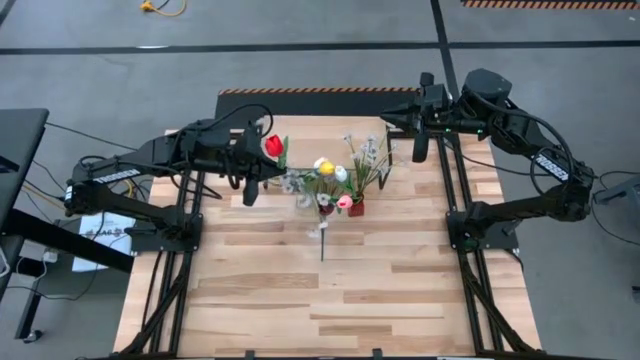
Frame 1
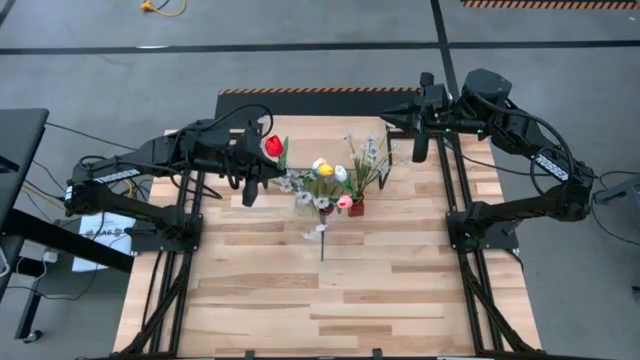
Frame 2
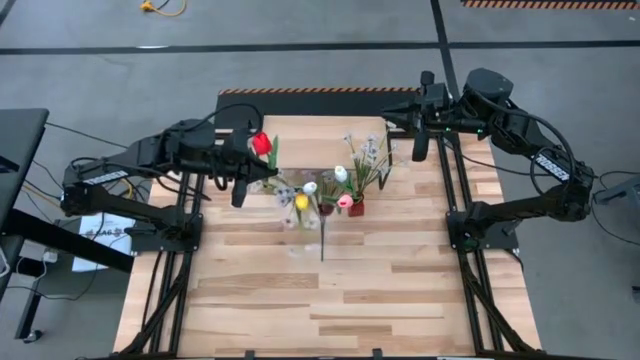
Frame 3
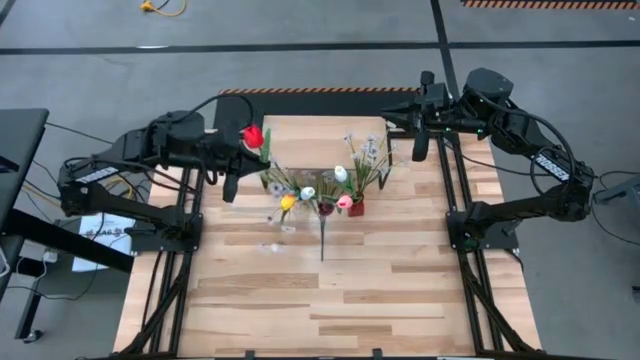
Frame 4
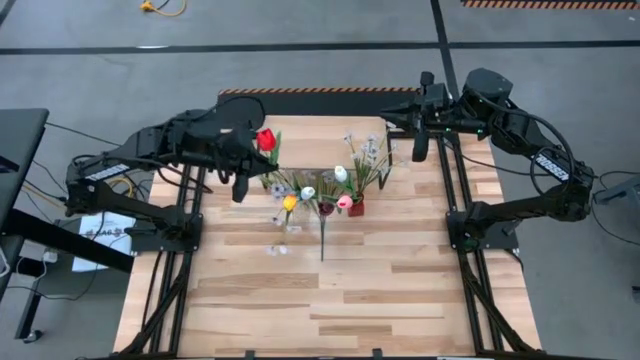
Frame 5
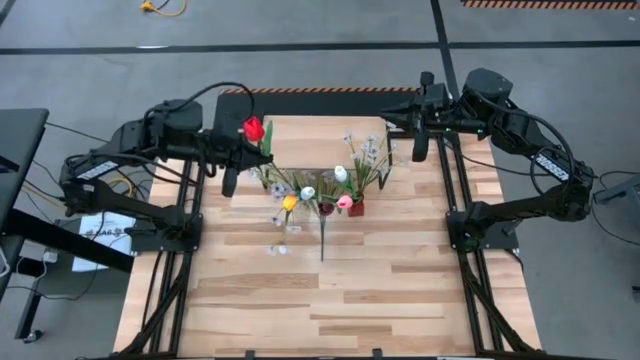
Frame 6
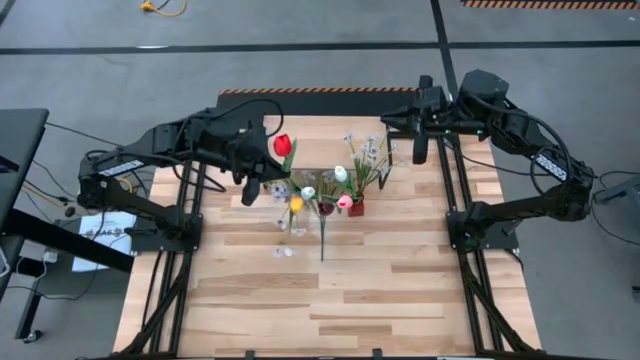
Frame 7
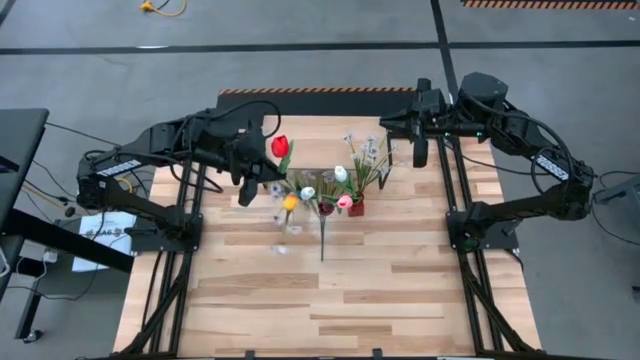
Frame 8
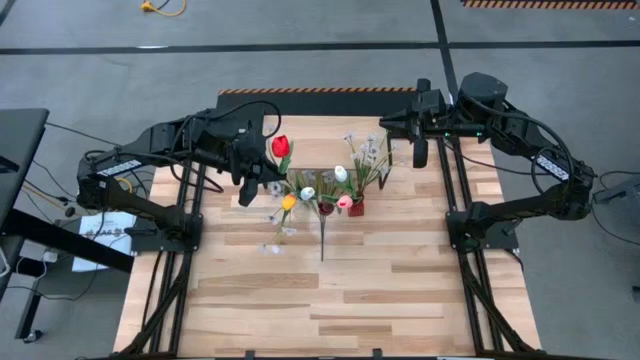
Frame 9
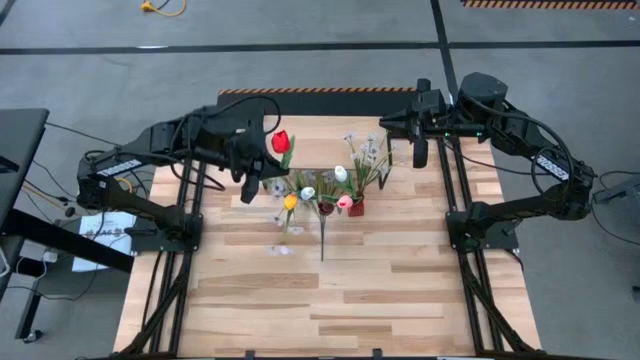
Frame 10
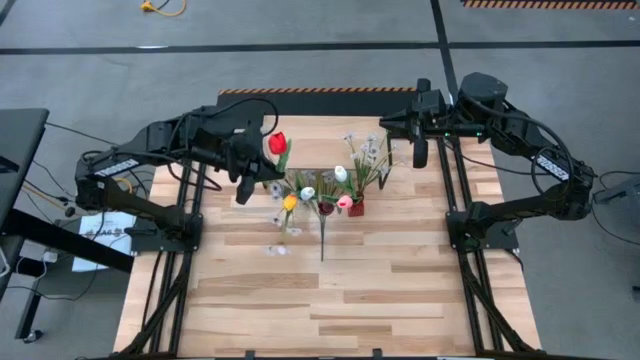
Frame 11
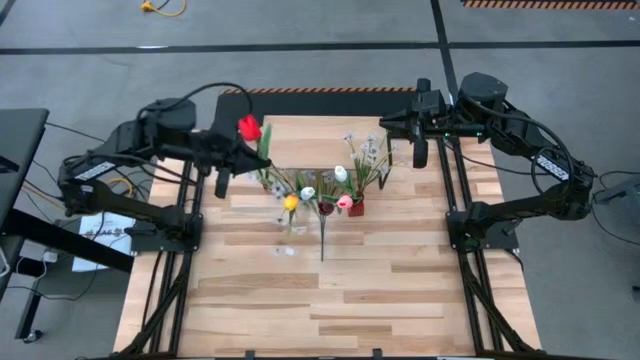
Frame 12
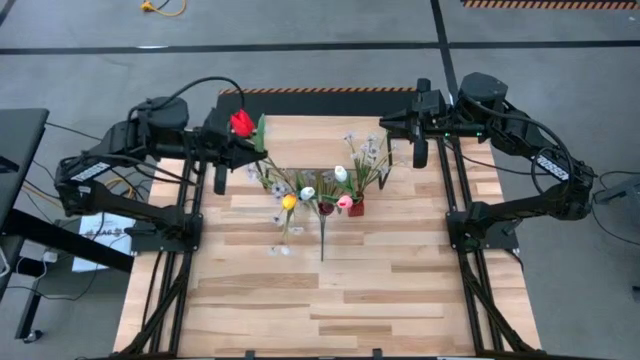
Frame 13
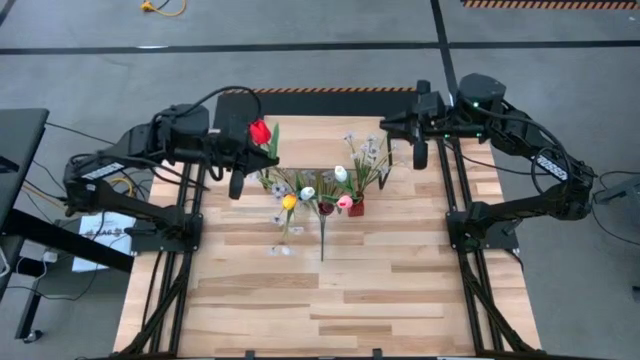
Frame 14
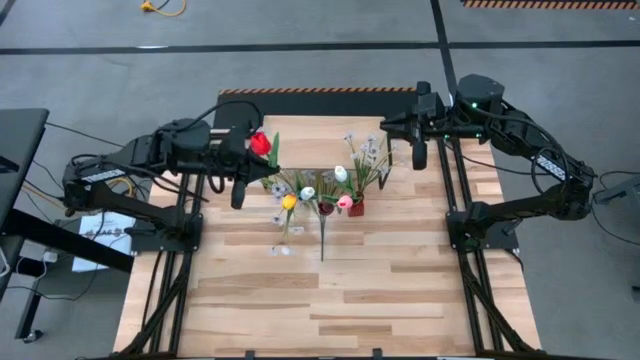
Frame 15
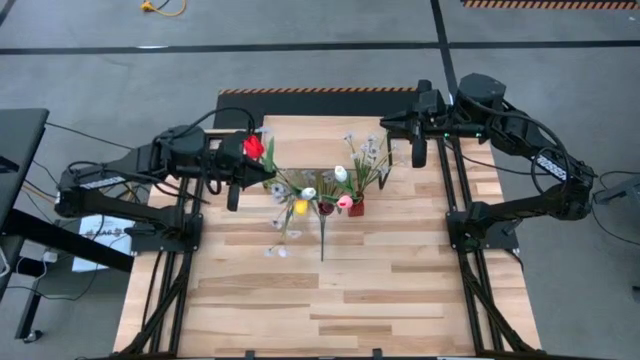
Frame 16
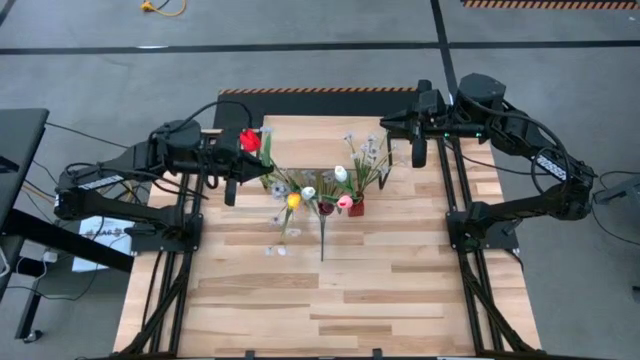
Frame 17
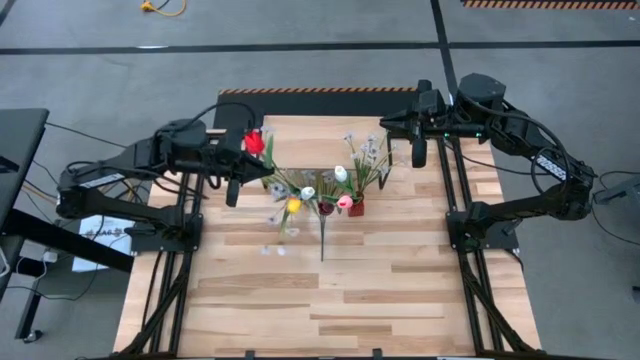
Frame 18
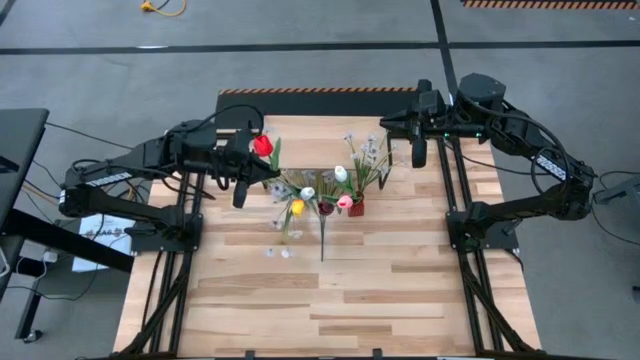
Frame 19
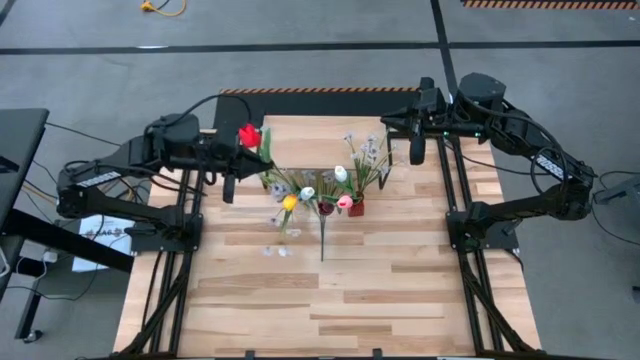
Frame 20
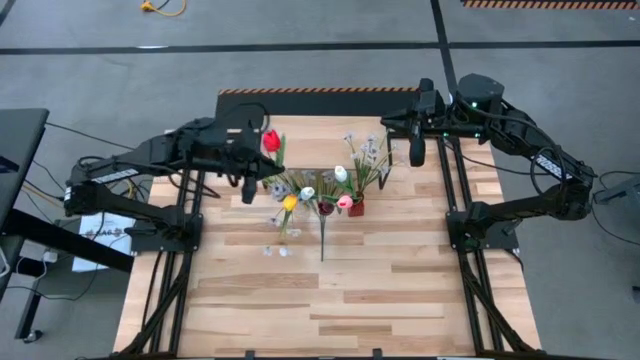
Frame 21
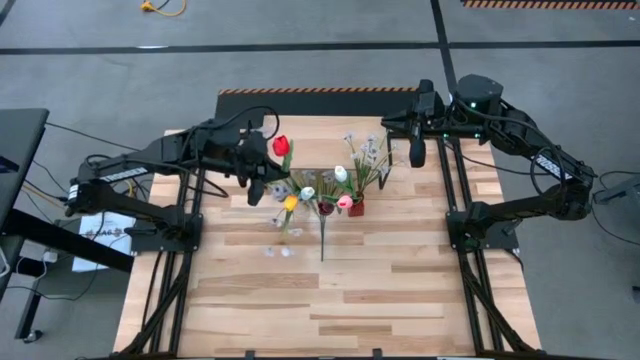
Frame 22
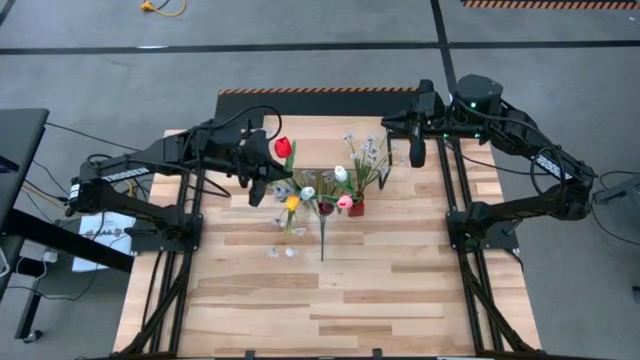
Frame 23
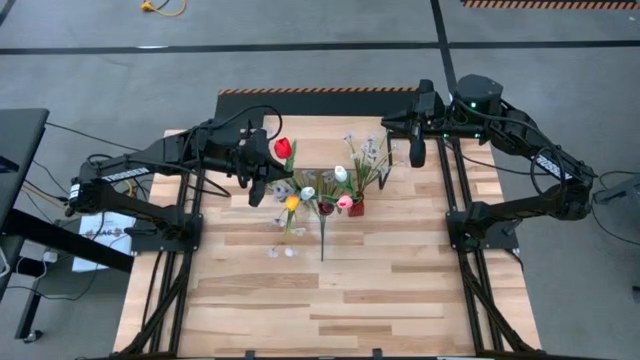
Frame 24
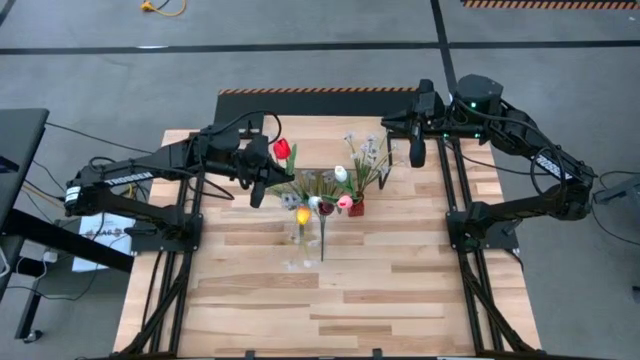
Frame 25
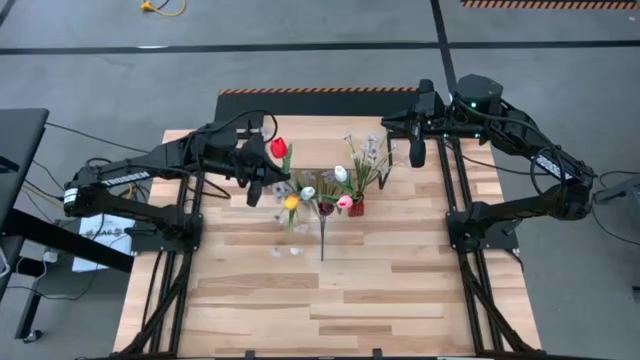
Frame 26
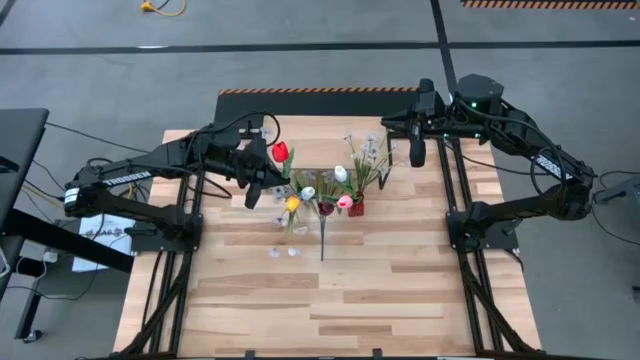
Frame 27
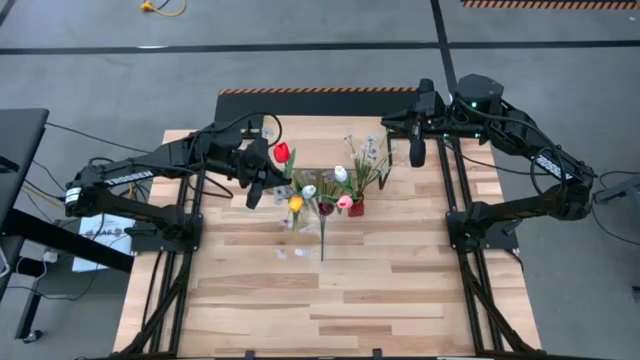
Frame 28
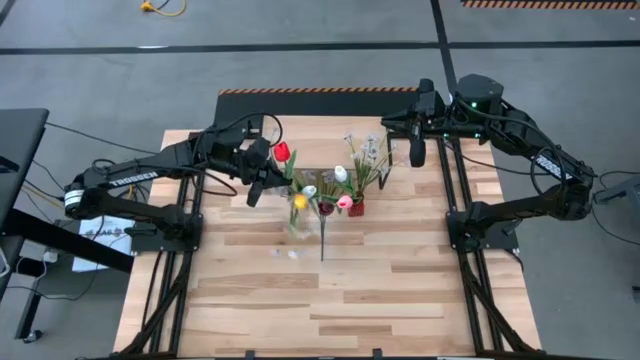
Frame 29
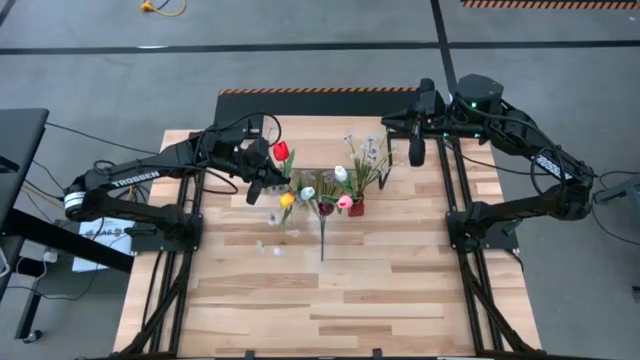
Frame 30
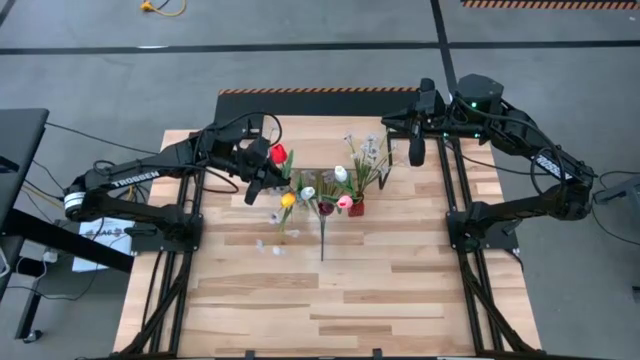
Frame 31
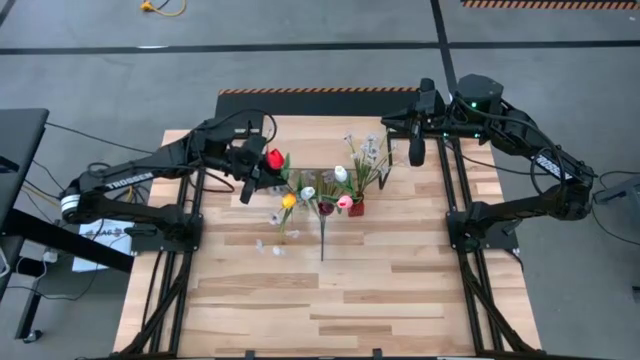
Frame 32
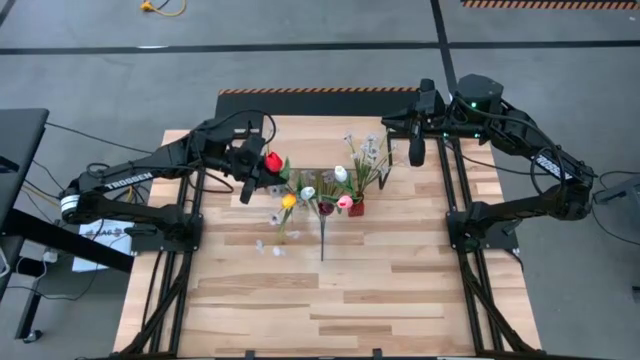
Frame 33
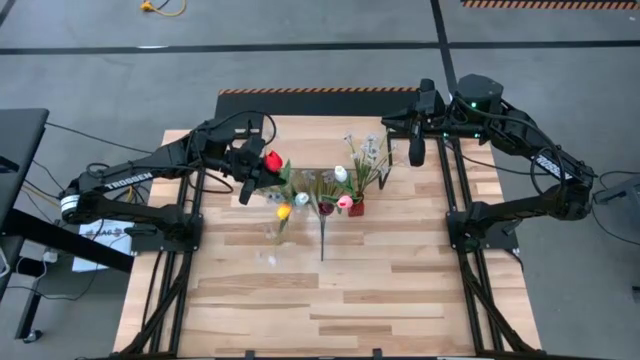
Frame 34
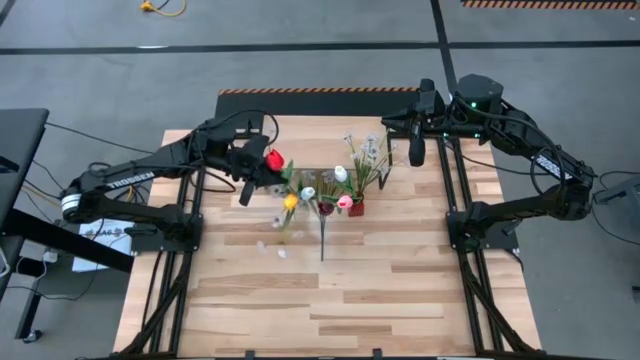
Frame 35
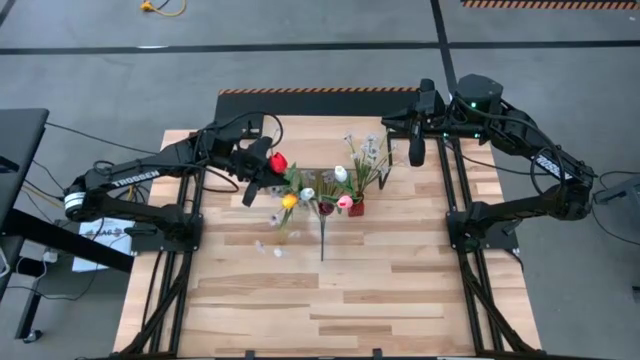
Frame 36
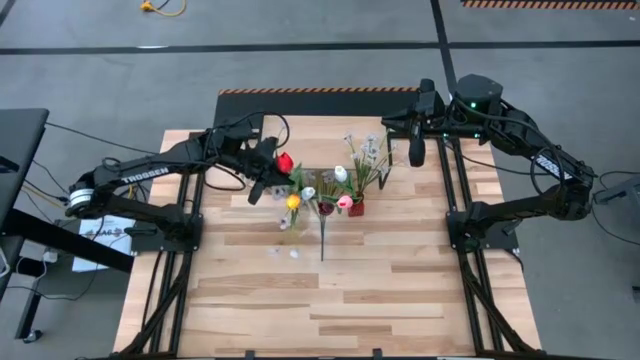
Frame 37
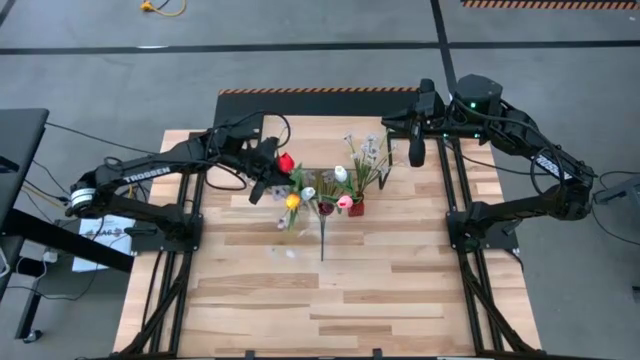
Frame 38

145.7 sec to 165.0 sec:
Task: Pick and place flowers into a vace then onto a shelf
Put the red flower into the transparent vase
